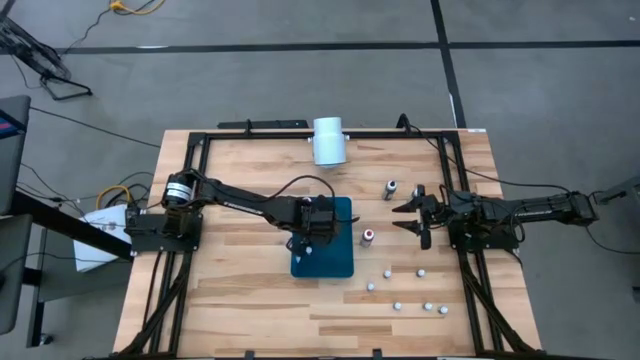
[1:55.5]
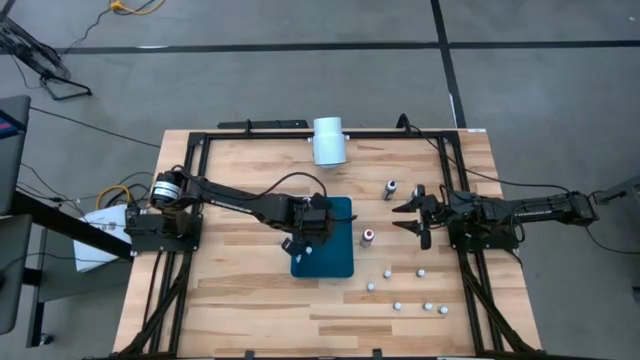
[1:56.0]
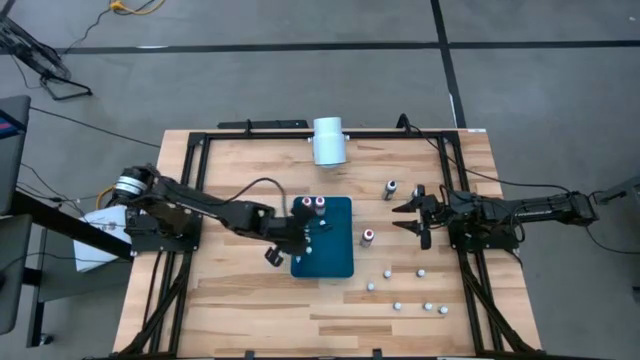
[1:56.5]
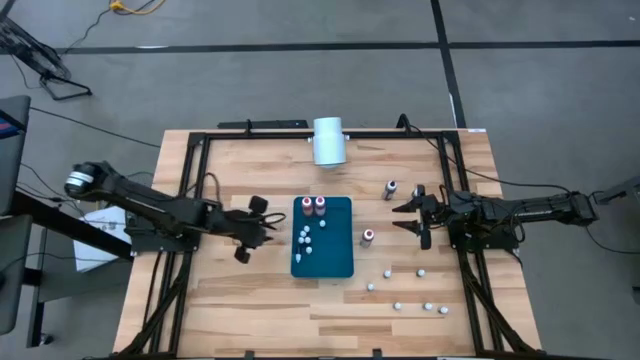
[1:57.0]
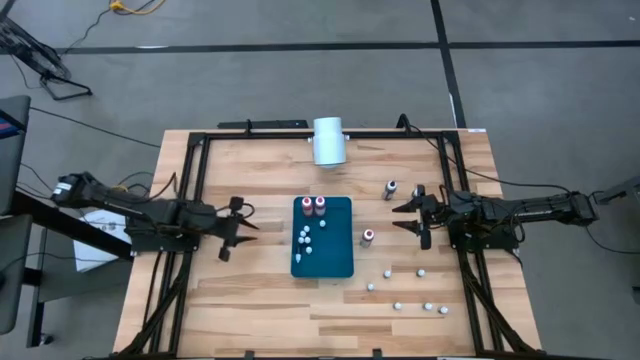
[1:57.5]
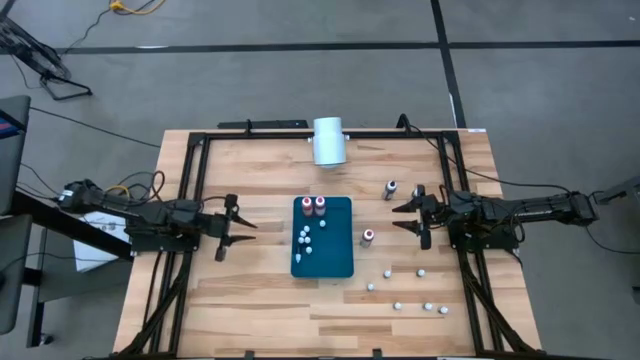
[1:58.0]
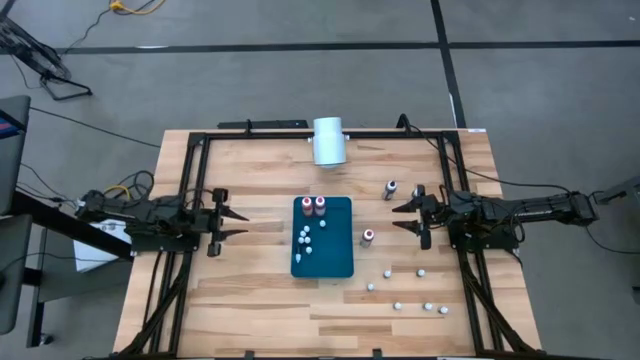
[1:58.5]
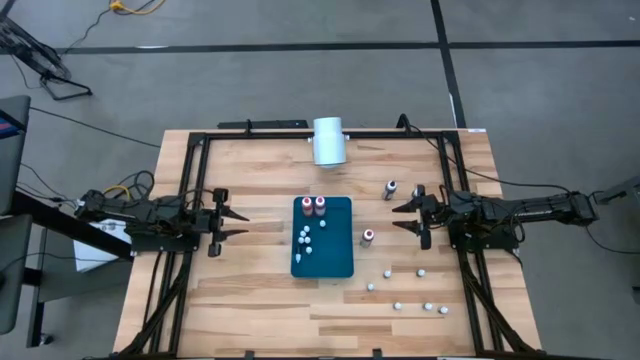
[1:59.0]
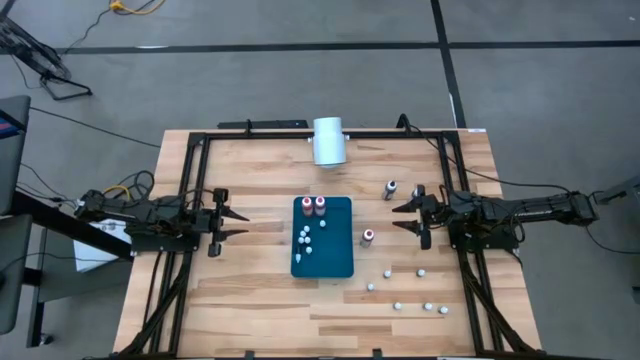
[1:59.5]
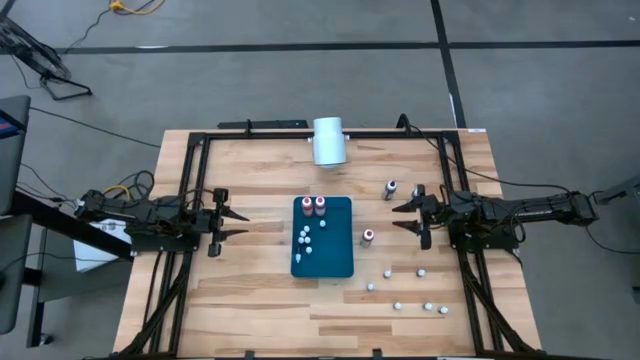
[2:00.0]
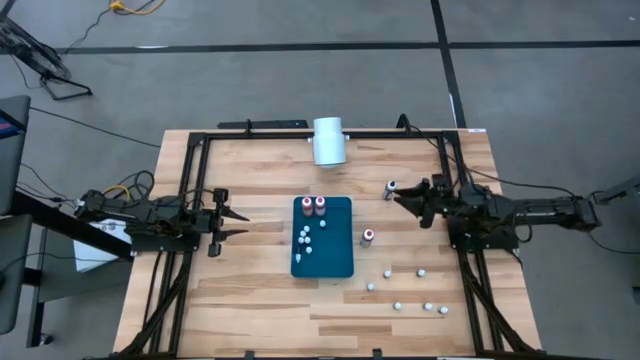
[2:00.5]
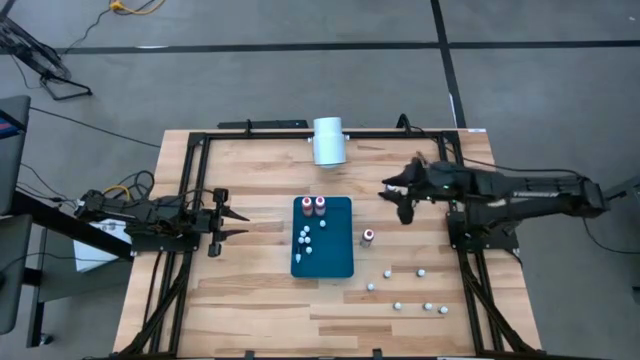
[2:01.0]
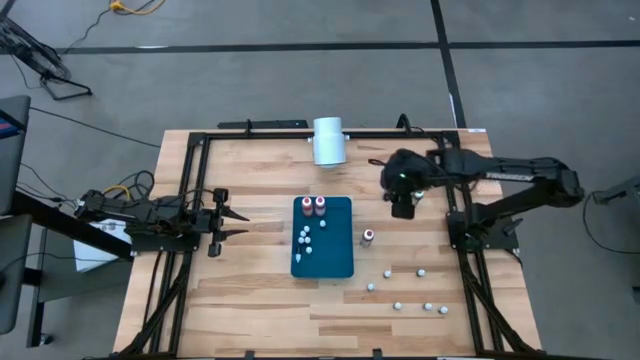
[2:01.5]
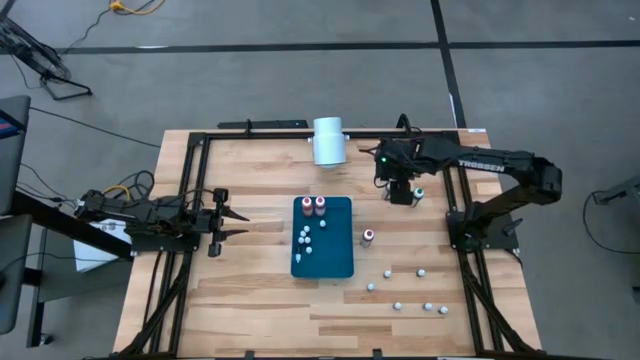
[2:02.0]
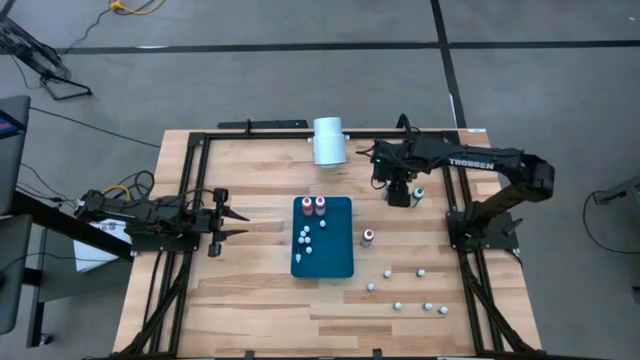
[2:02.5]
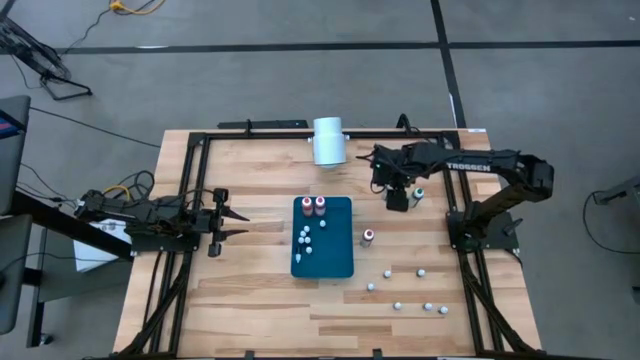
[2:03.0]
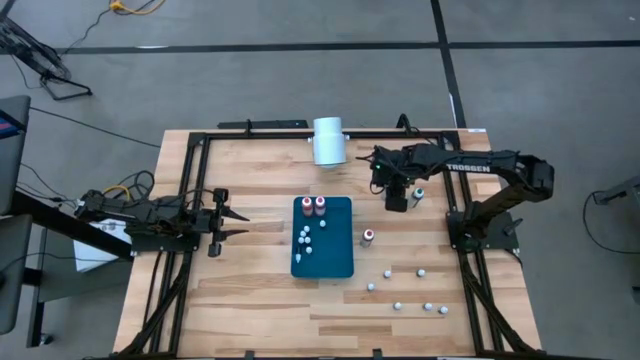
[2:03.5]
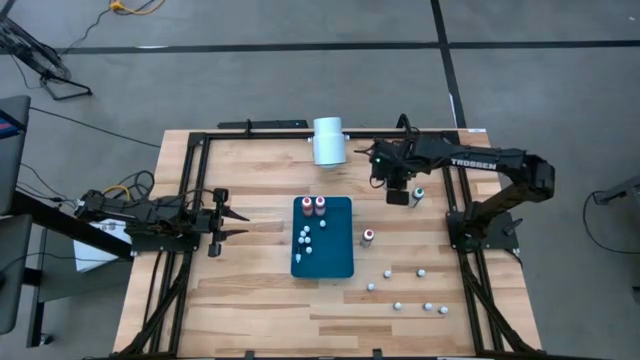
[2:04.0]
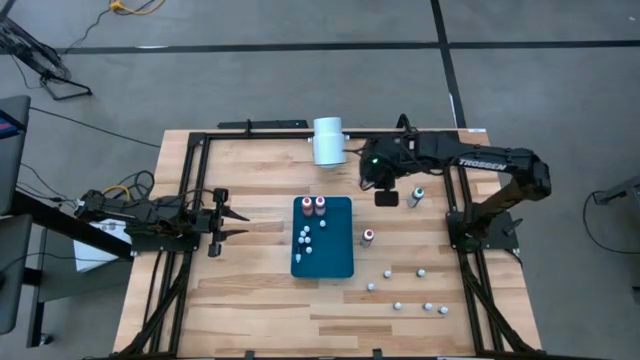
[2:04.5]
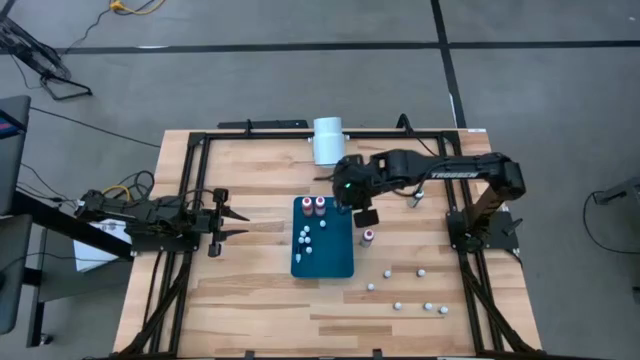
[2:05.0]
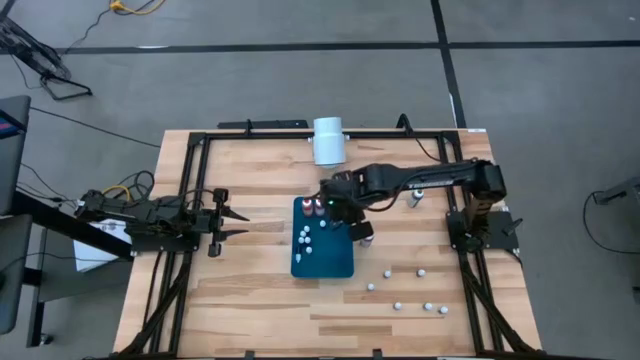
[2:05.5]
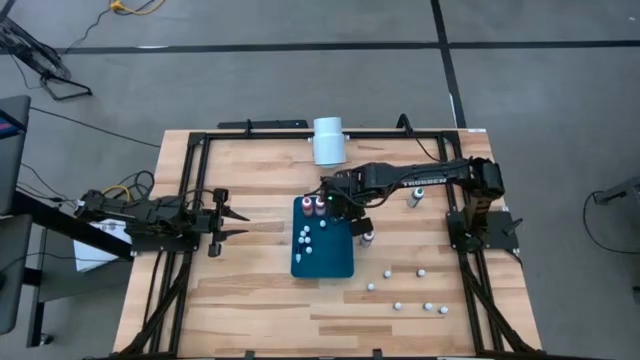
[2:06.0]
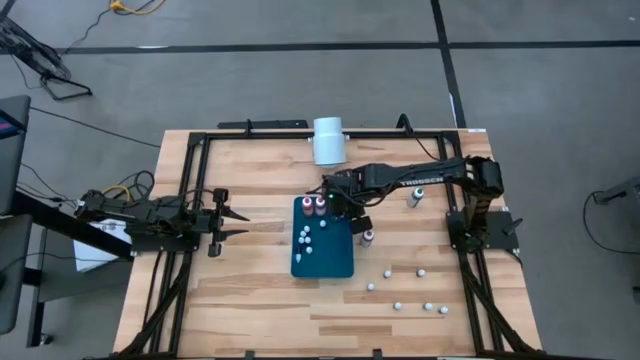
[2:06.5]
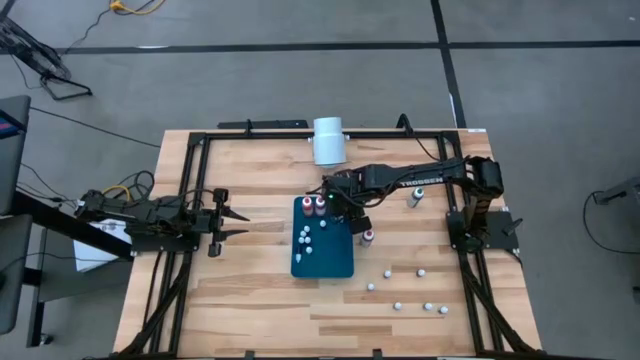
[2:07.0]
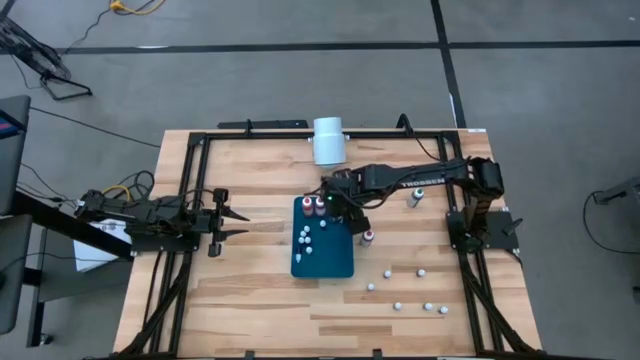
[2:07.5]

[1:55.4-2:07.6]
Task: Pick & Place food coloring
Put the large black food coloring bottle into the blue bin

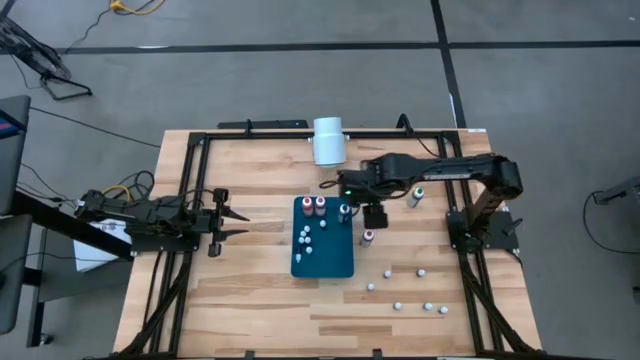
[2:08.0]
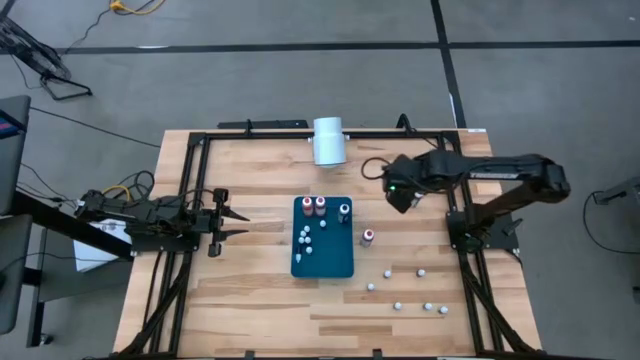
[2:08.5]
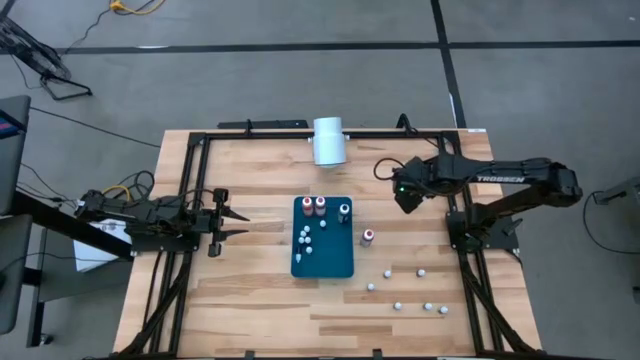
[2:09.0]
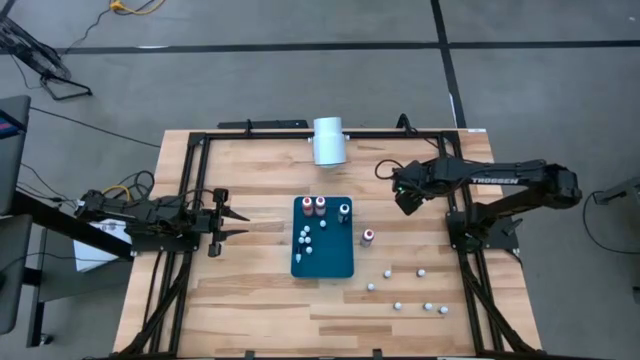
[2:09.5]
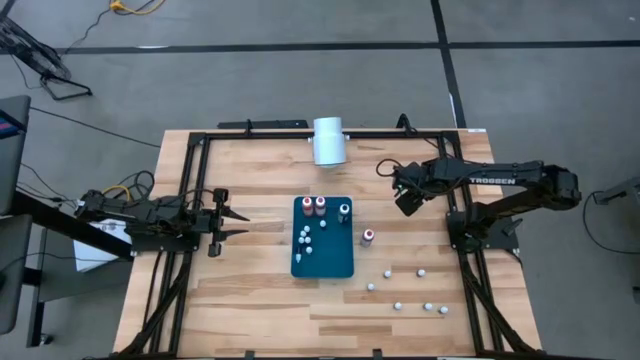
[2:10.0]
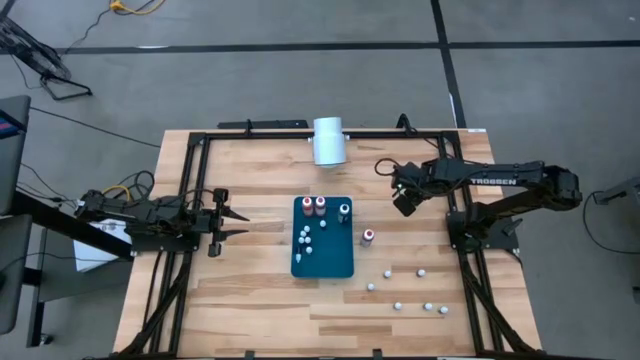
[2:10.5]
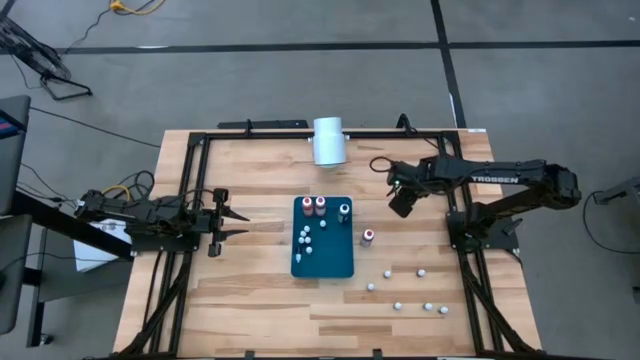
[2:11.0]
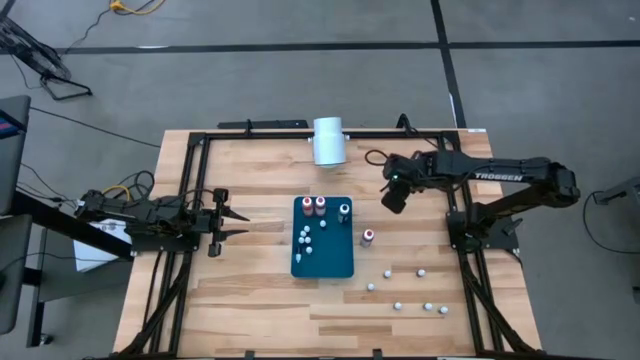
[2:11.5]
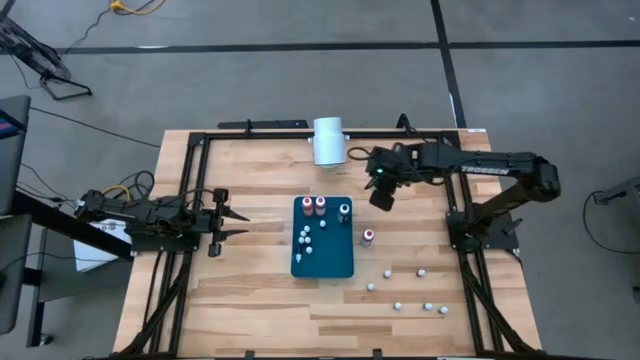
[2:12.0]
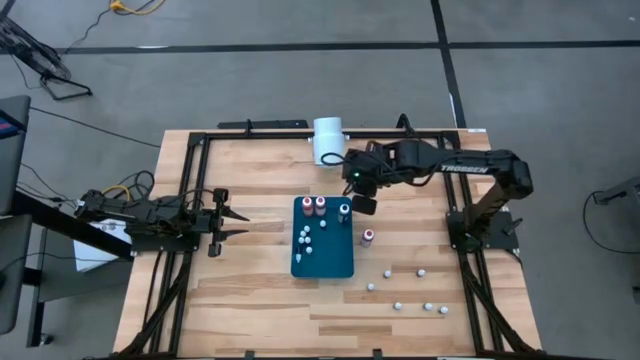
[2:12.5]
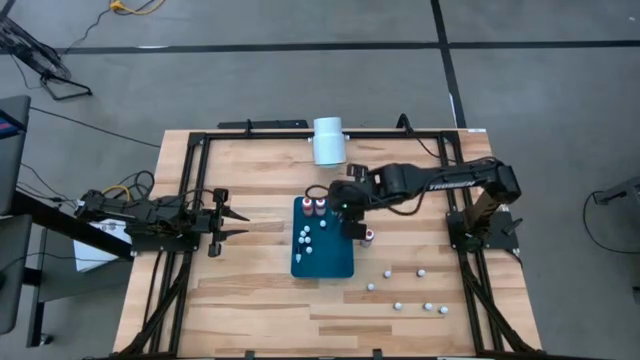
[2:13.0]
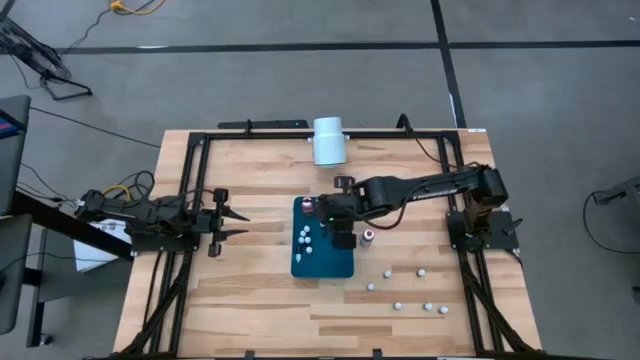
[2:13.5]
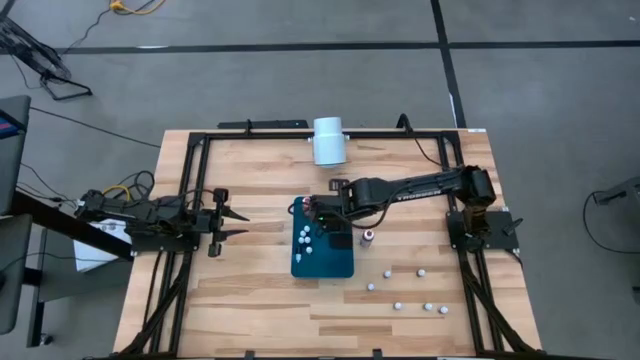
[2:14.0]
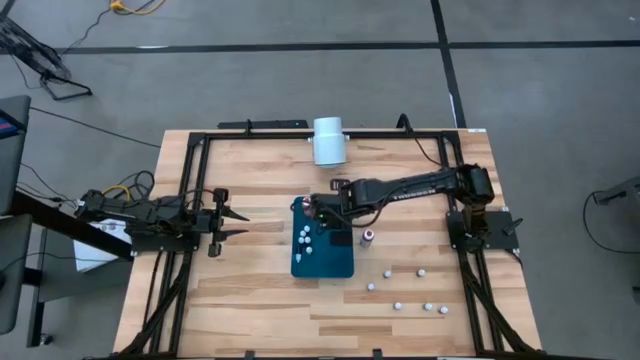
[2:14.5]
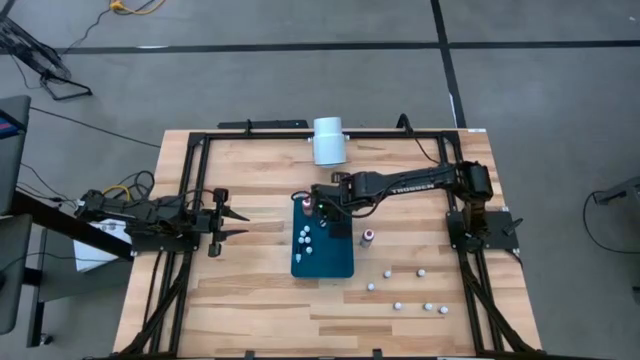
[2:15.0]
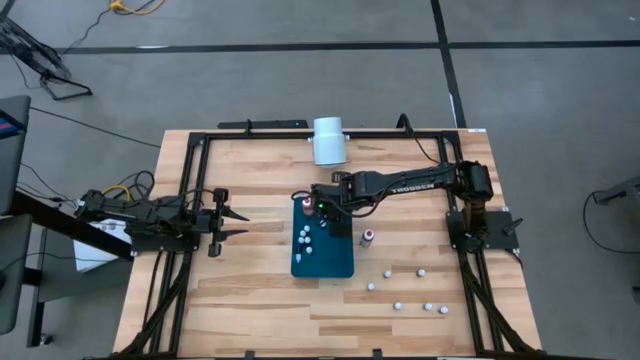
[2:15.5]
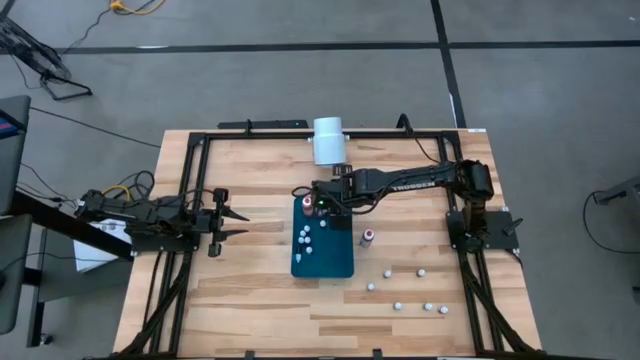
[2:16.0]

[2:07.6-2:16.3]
Put the large green food coloring bottle into the blue bin

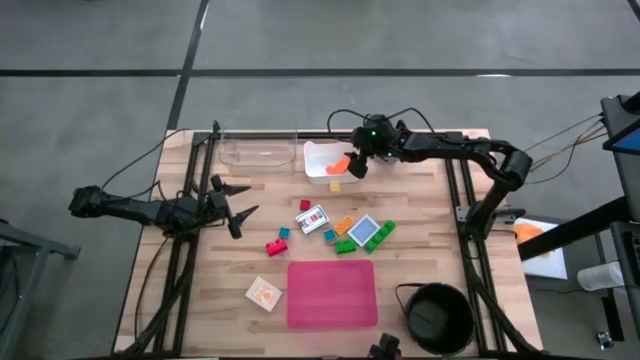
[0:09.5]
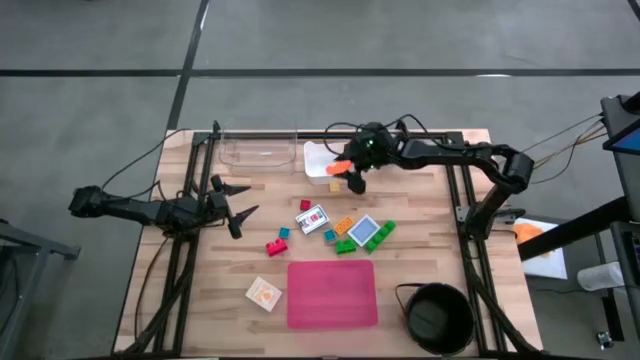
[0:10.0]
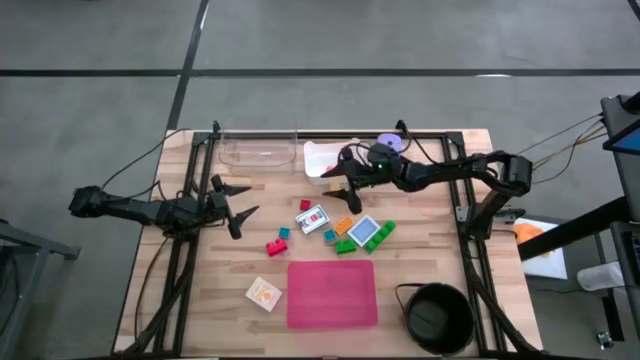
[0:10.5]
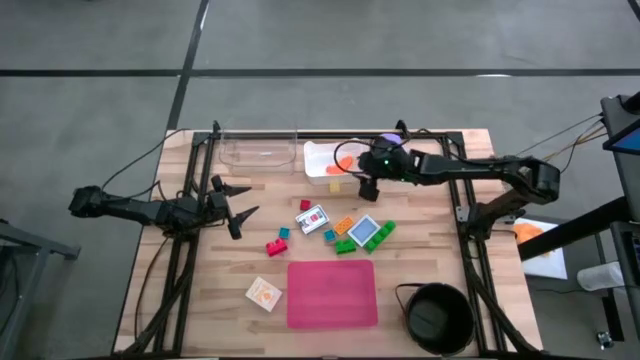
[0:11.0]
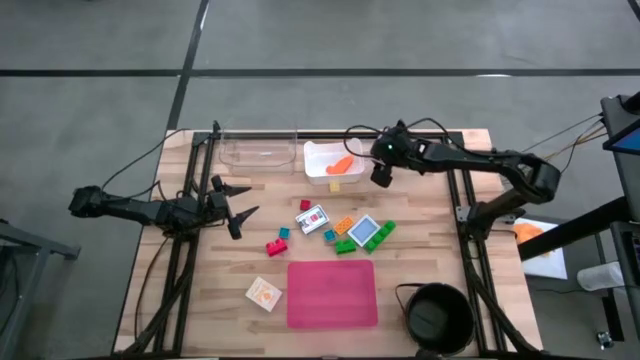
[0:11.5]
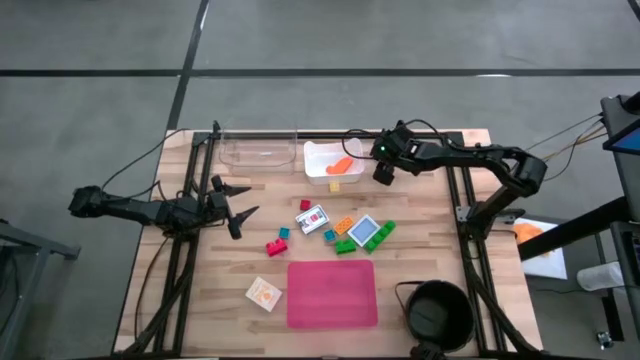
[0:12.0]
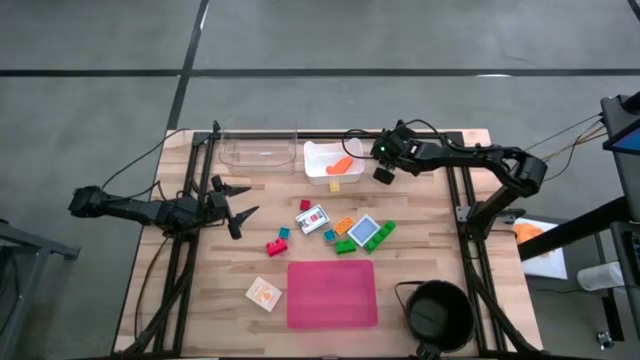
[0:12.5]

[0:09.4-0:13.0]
Task: Pick & Place Toys
Put the violet die into the transparent bin
